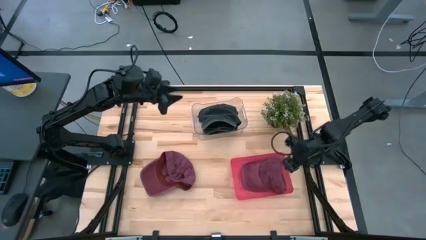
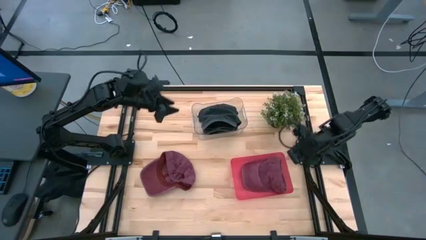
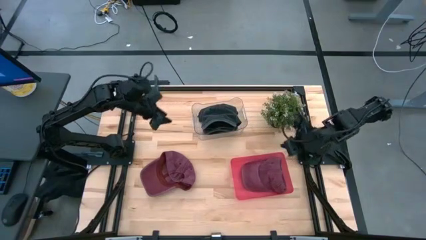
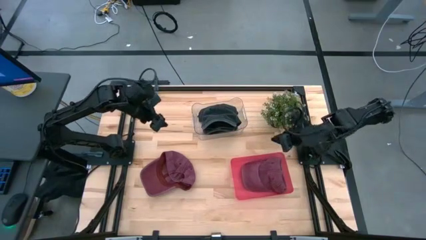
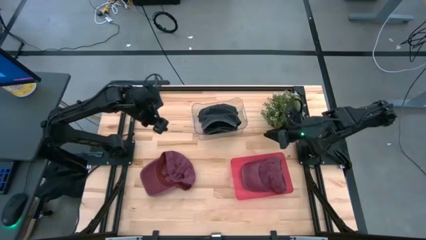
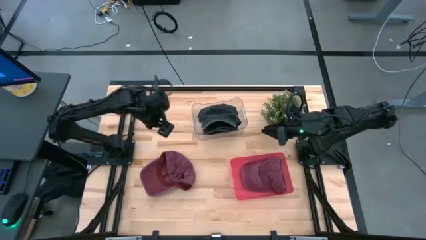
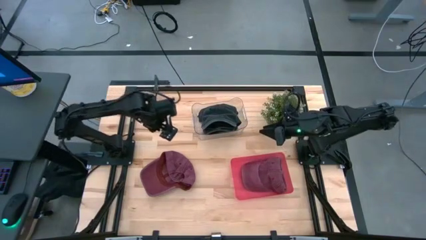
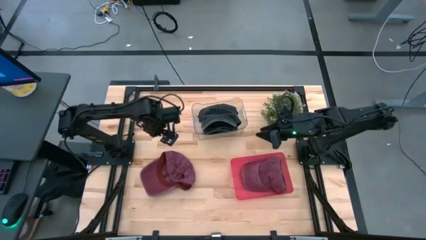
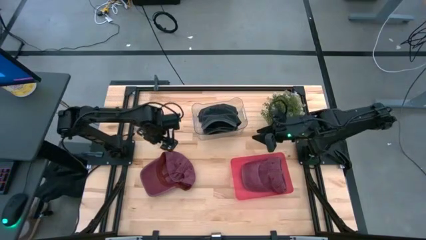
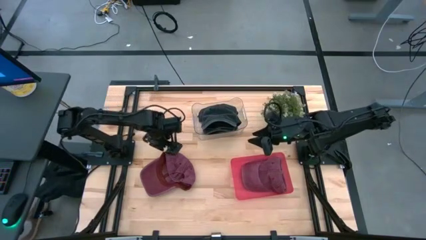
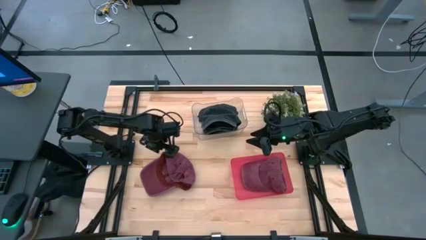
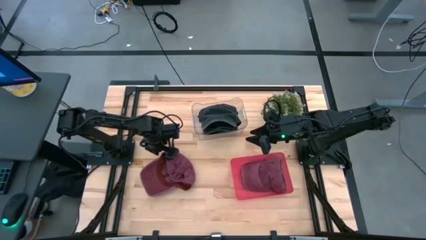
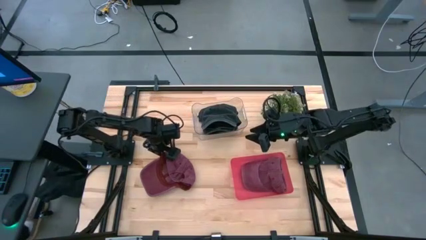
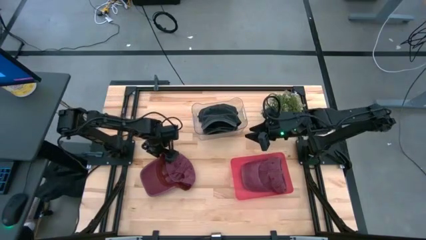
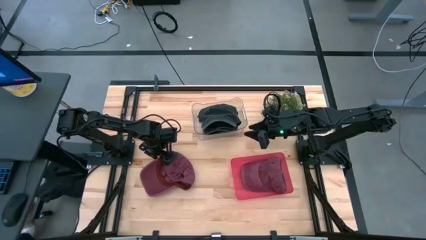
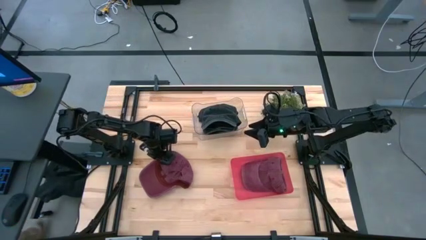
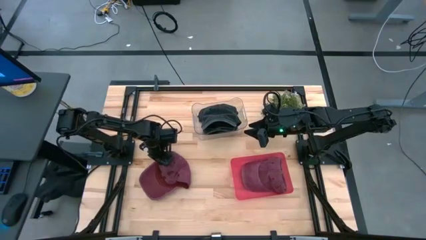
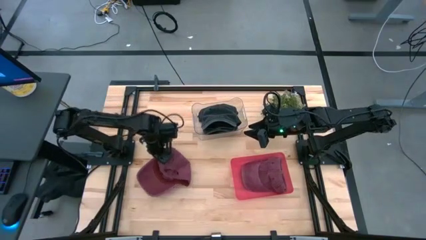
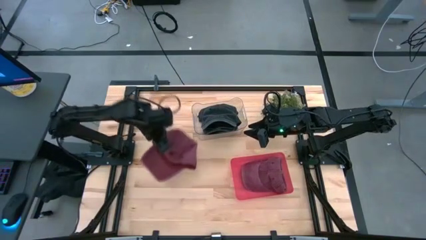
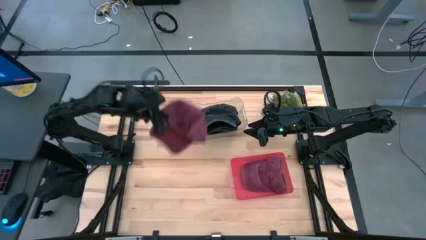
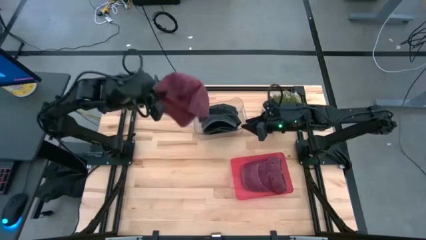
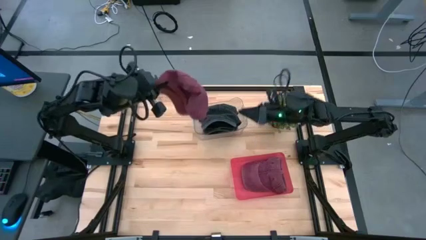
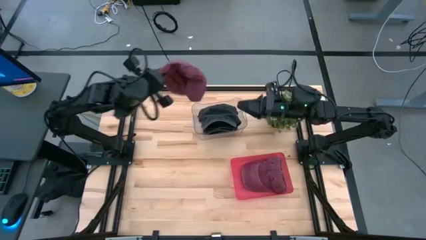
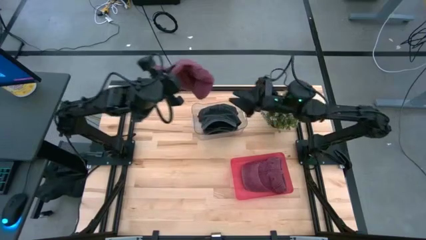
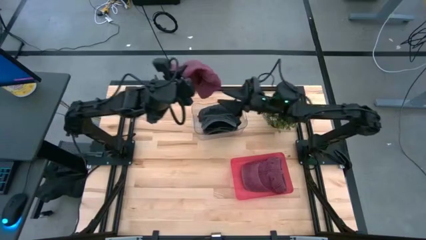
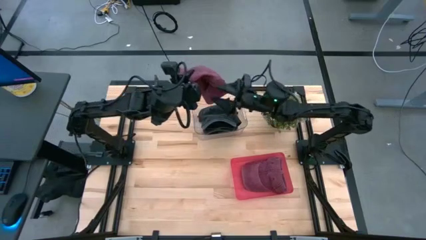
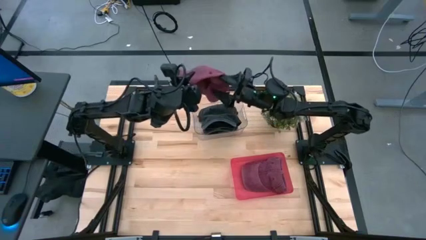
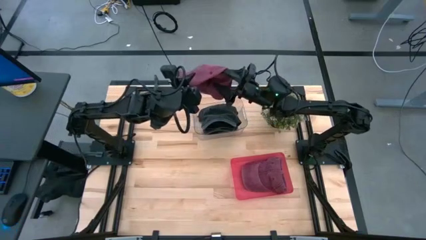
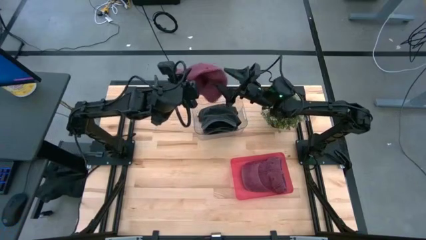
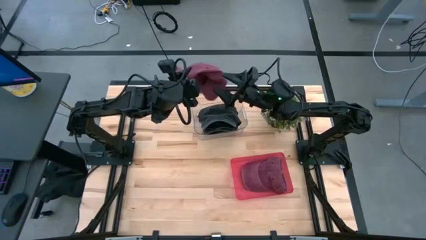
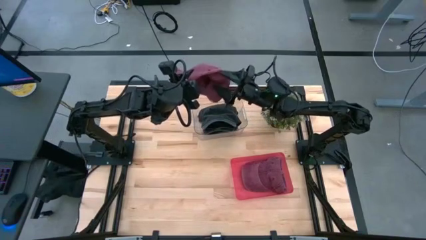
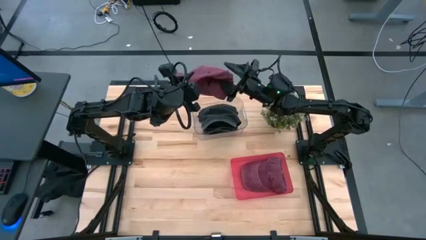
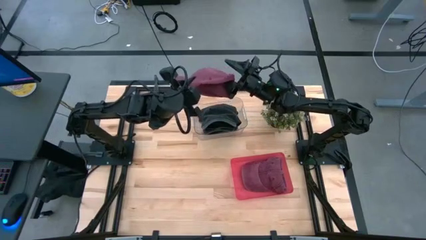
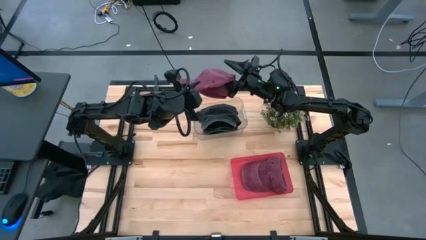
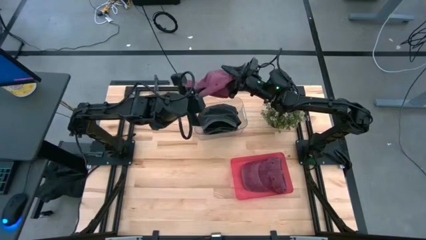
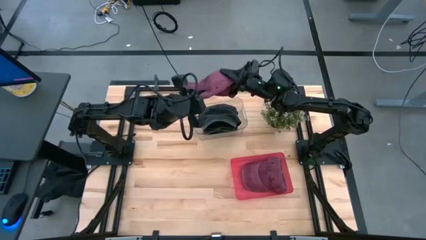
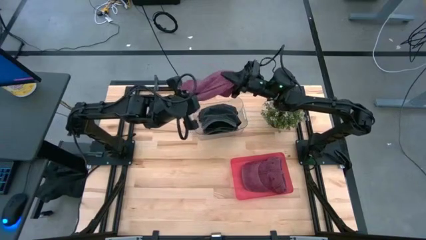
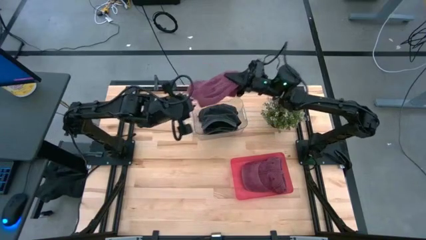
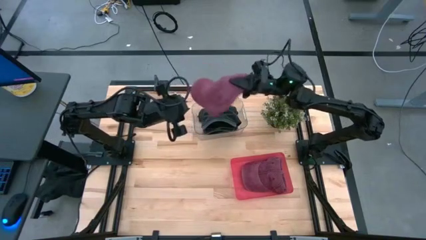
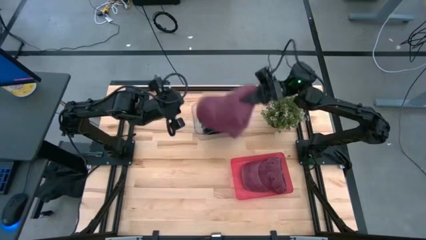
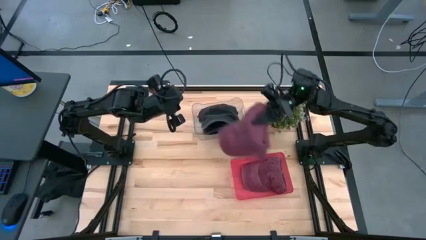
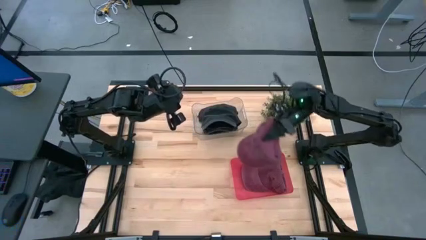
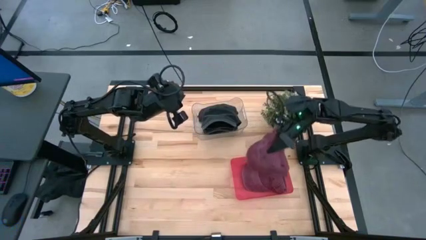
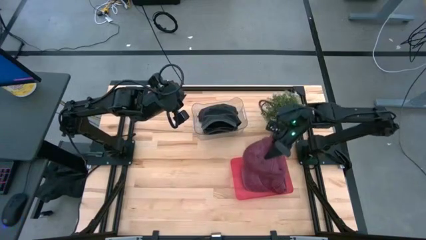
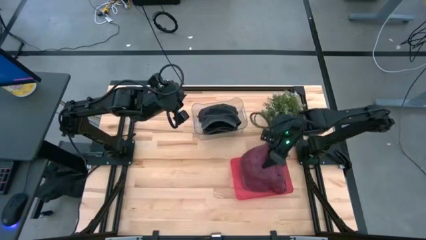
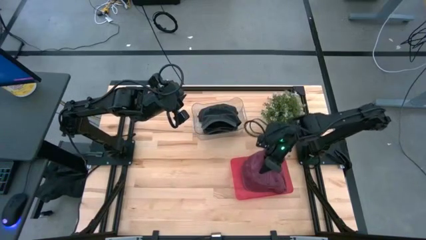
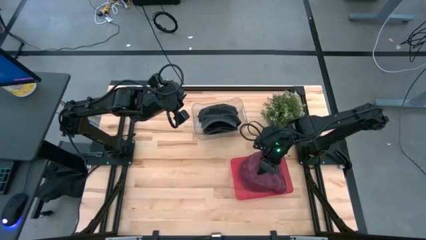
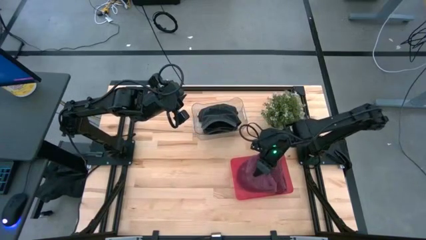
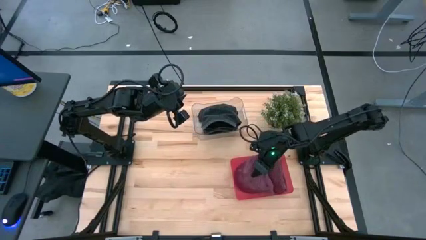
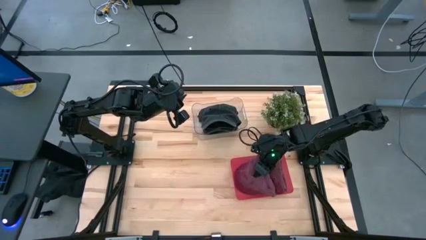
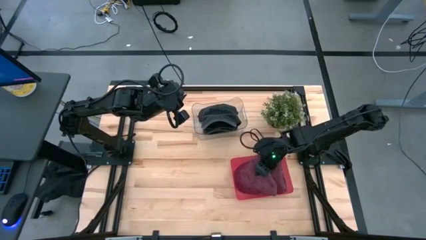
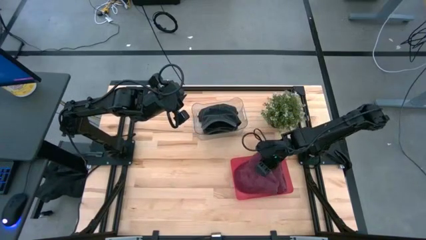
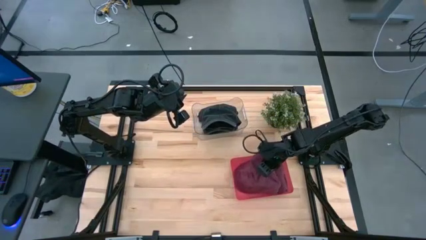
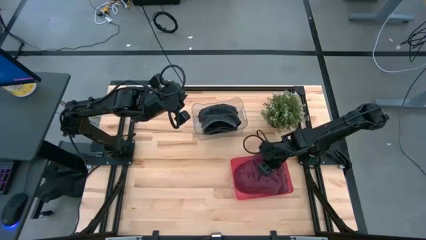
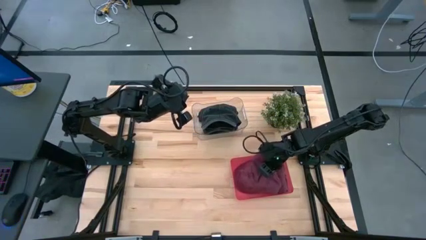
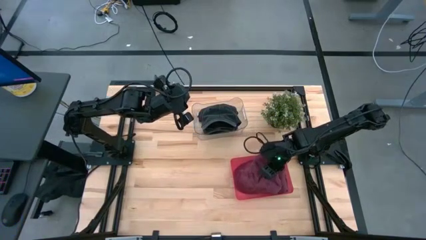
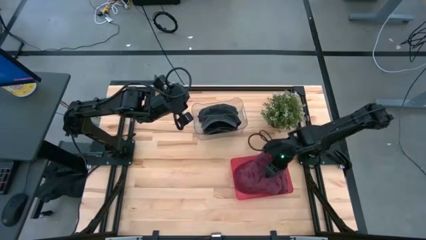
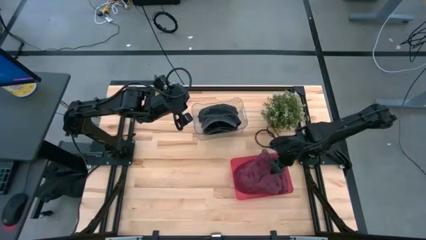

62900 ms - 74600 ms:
Task: Pick & Place hat
Put the red cap into the pink bin
